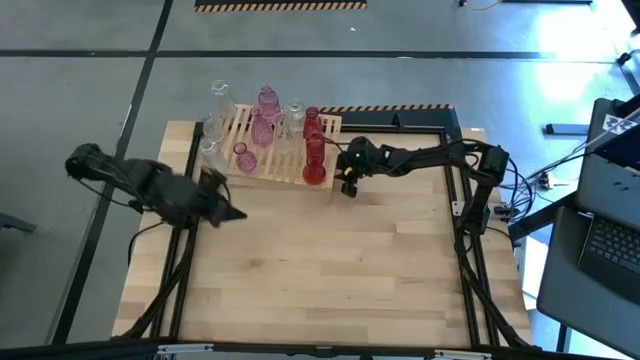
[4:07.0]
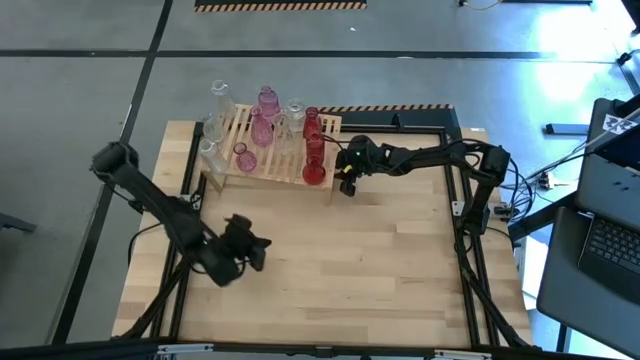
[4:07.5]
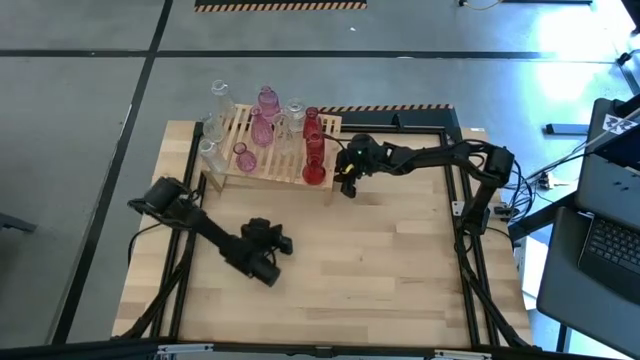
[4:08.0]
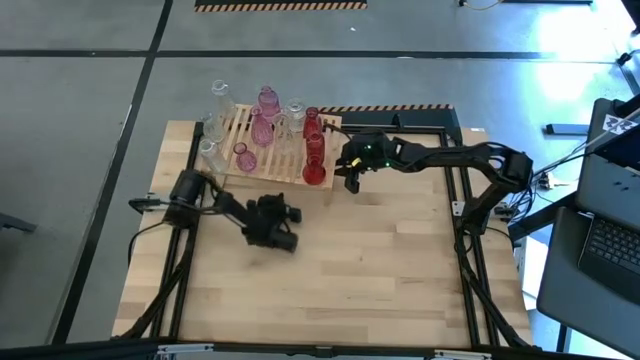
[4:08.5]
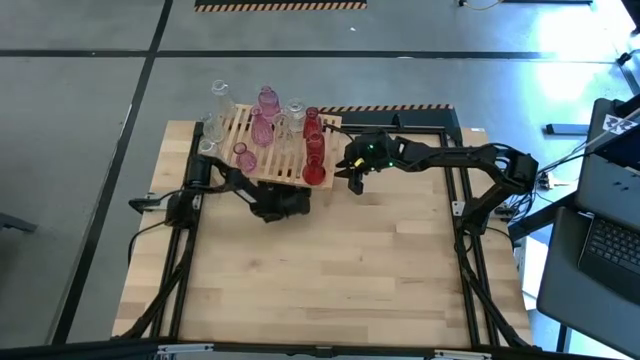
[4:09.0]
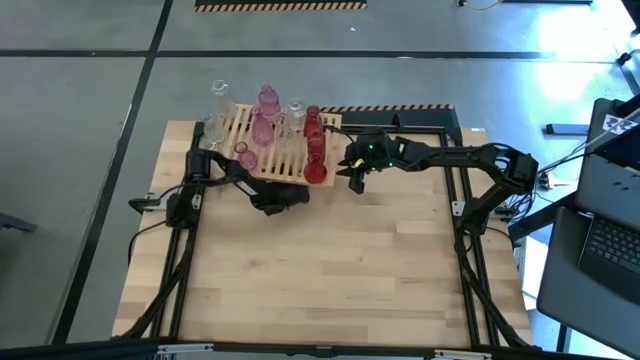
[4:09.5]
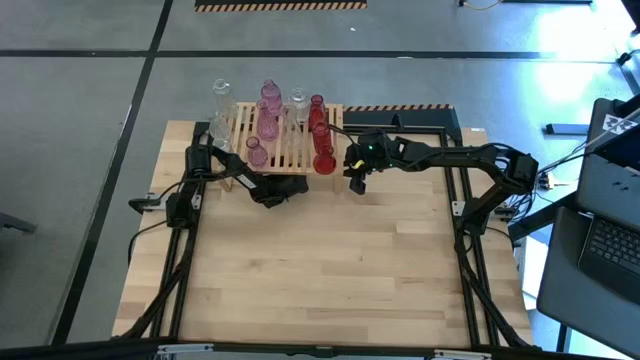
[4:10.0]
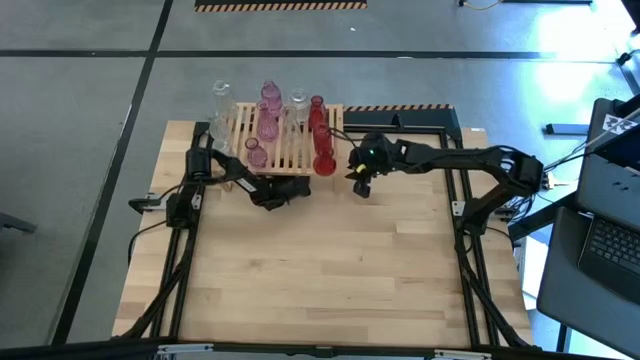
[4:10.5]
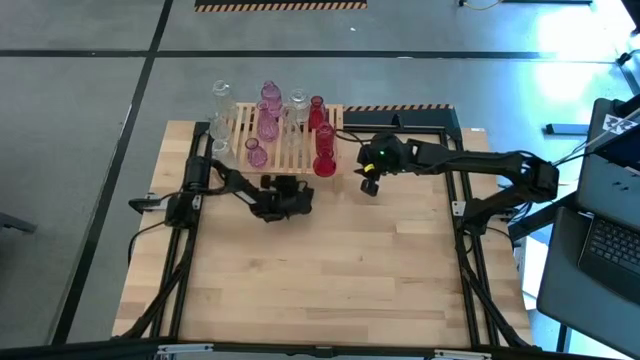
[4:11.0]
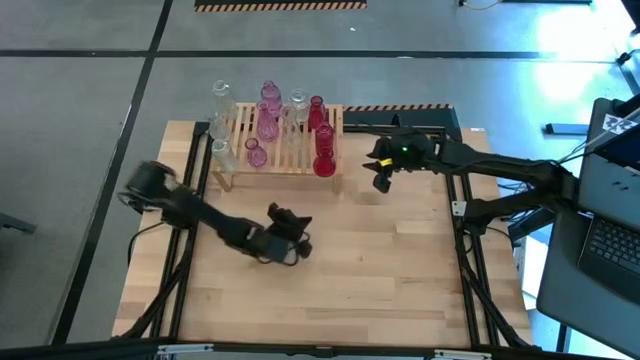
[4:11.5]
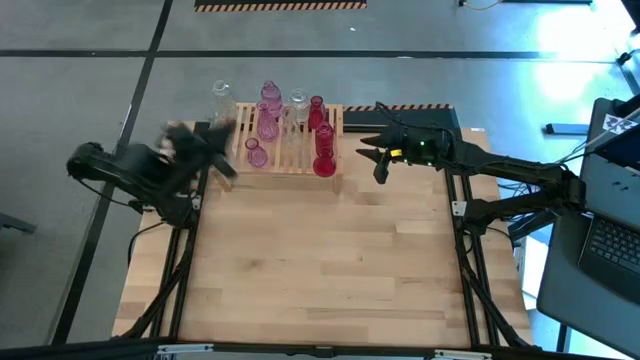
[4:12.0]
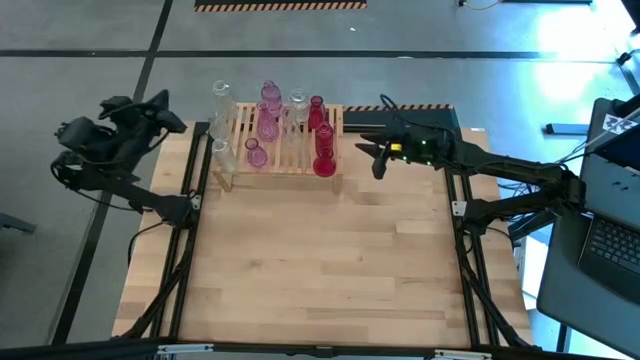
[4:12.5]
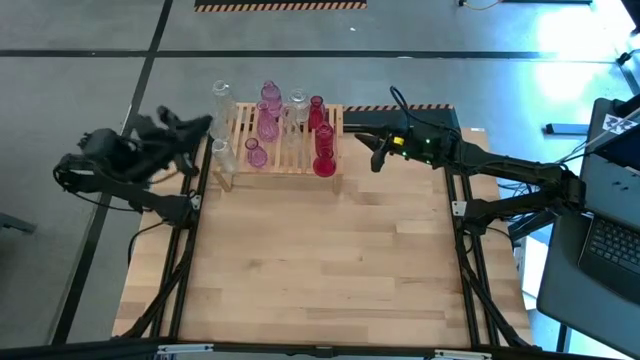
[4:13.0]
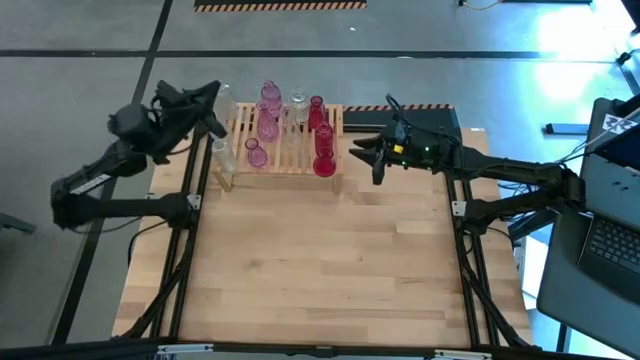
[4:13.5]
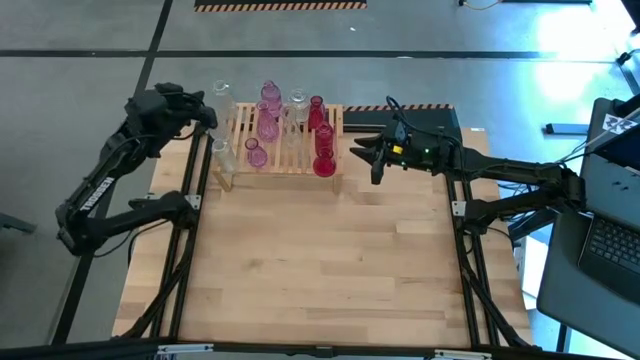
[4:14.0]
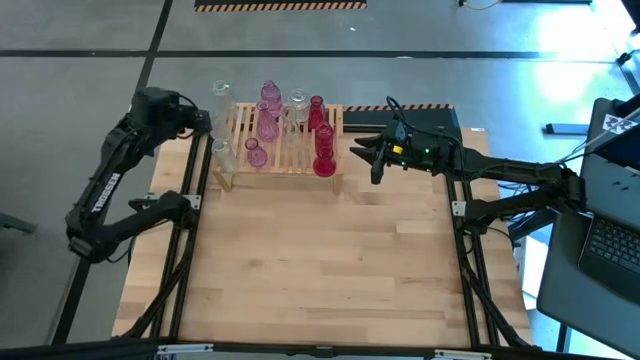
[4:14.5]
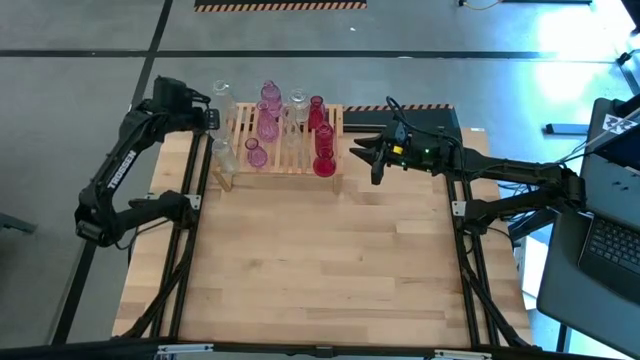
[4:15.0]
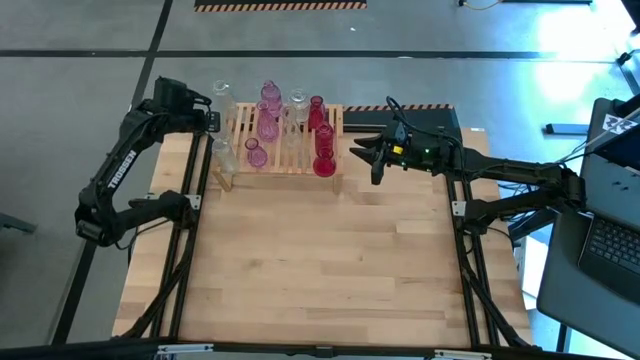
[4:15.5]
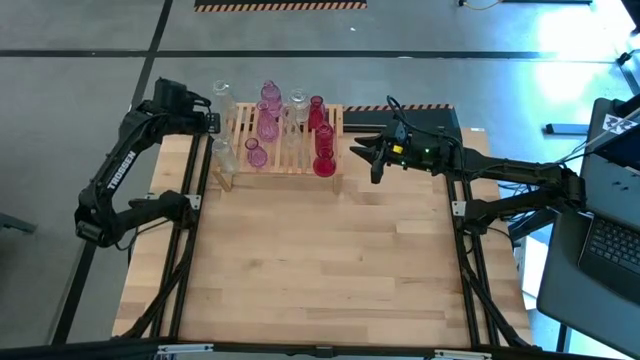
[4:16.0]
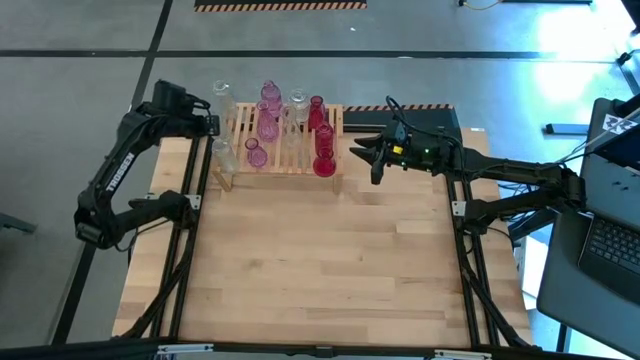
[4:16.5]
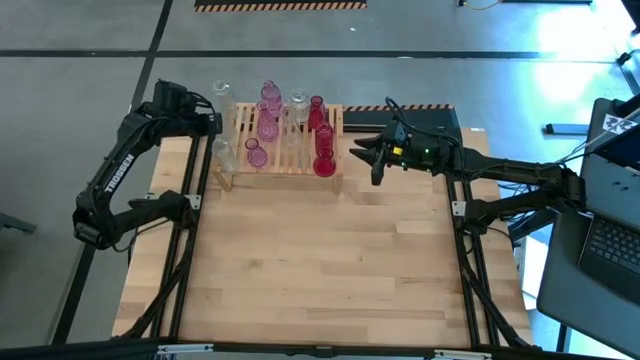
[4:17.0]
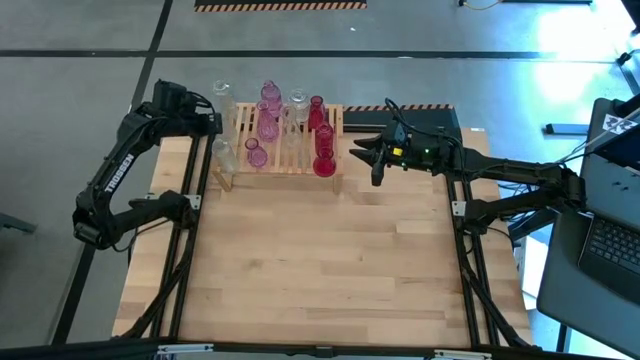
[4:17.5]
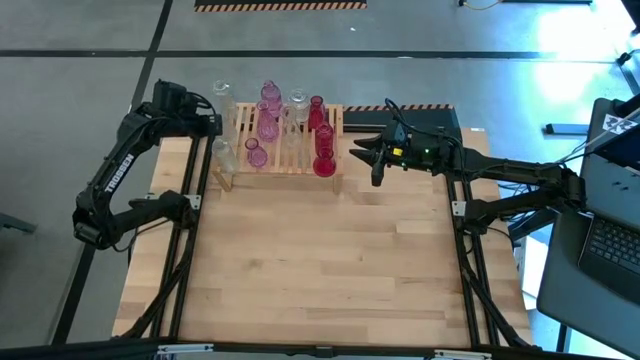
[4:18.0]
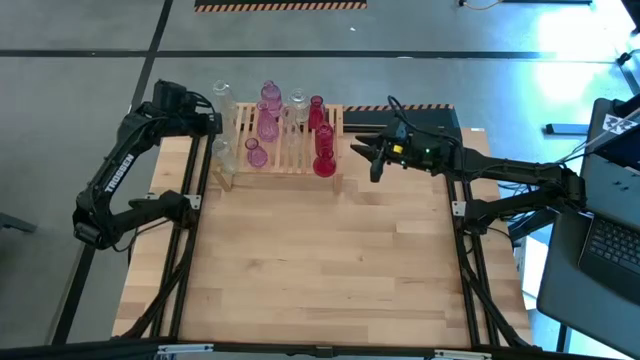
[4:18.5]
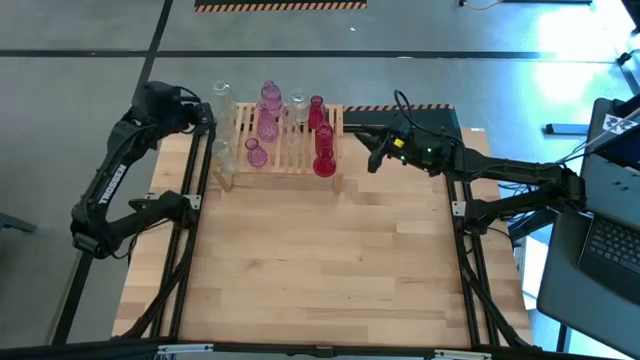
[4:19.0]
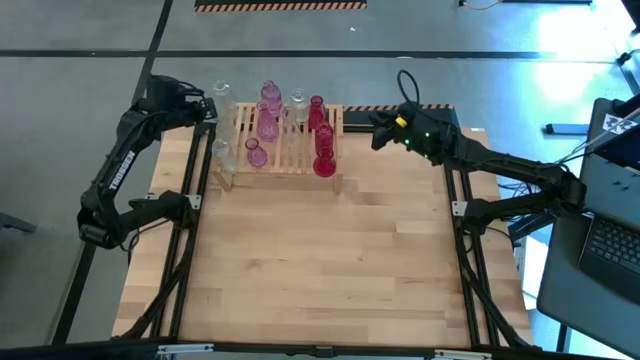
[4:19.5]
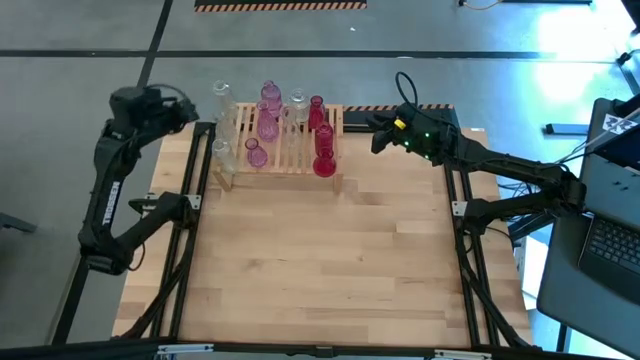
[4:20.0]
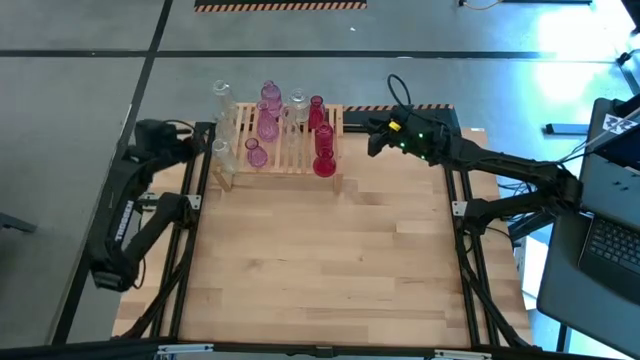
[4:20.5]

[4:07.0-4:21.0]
Task: sort vases onto shelf
Adjust the transparent vase on the shelf

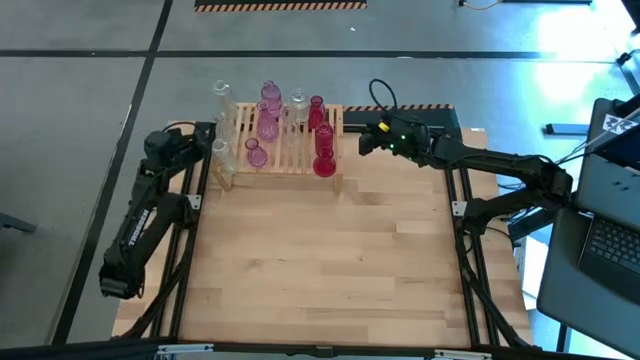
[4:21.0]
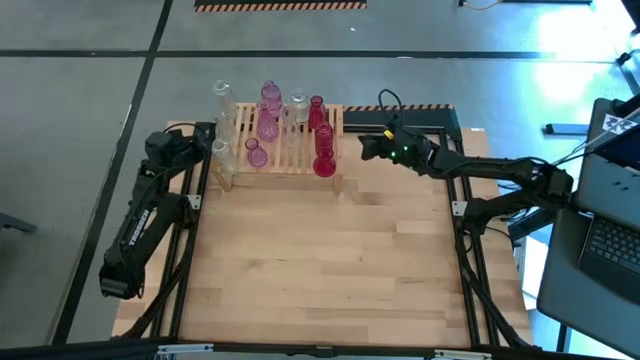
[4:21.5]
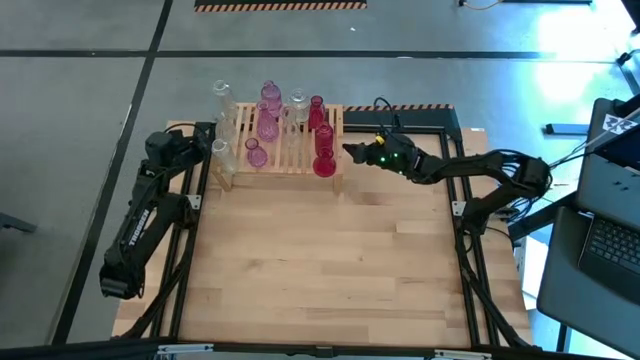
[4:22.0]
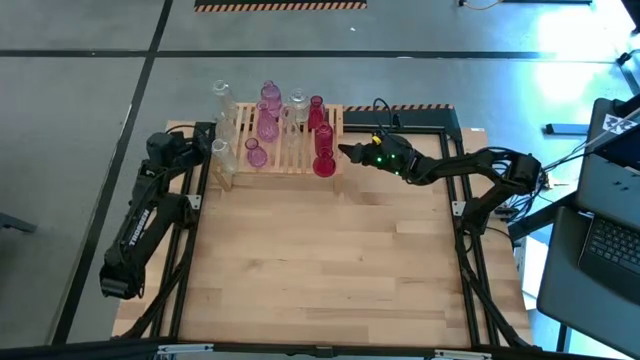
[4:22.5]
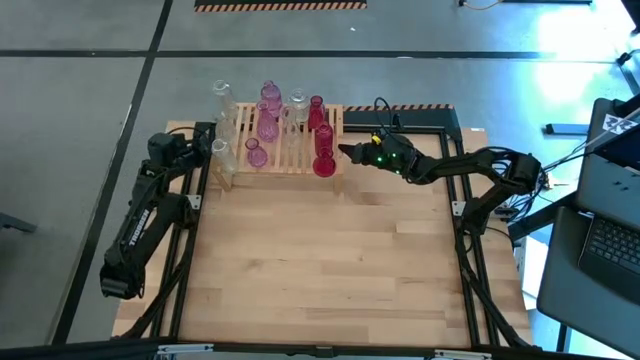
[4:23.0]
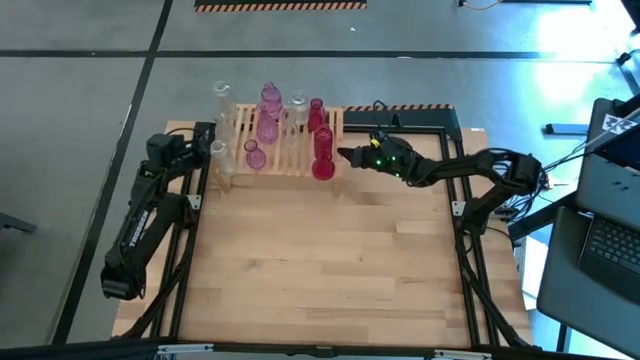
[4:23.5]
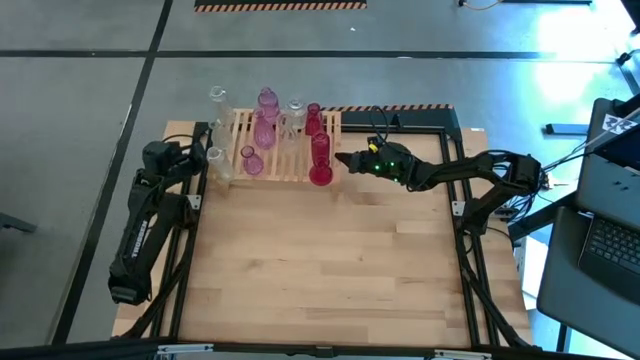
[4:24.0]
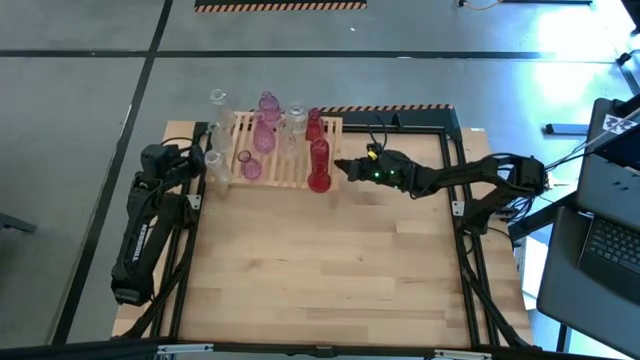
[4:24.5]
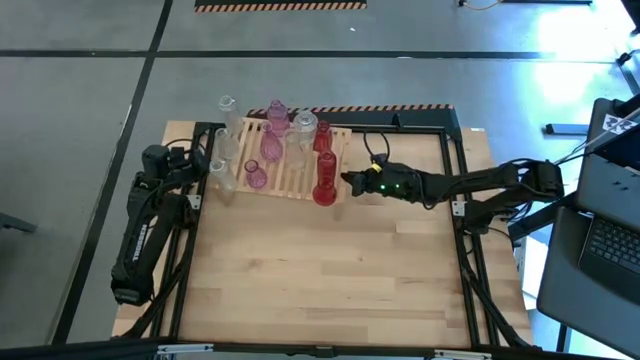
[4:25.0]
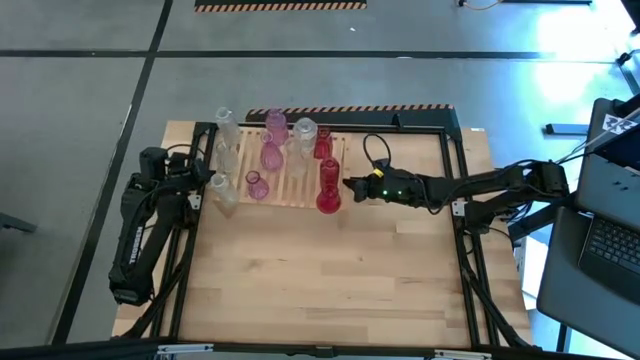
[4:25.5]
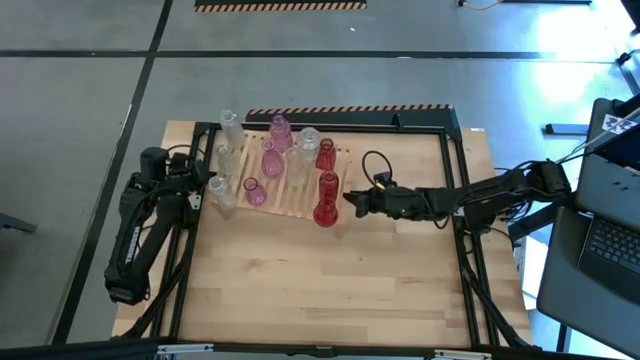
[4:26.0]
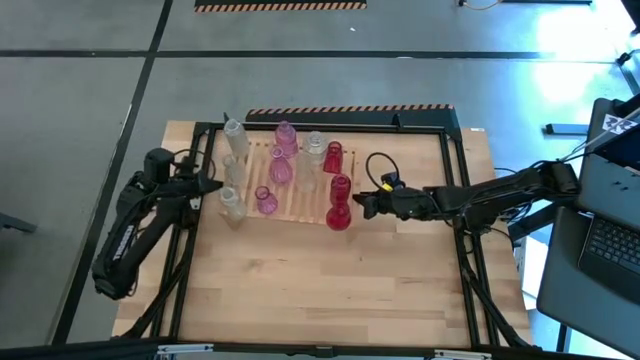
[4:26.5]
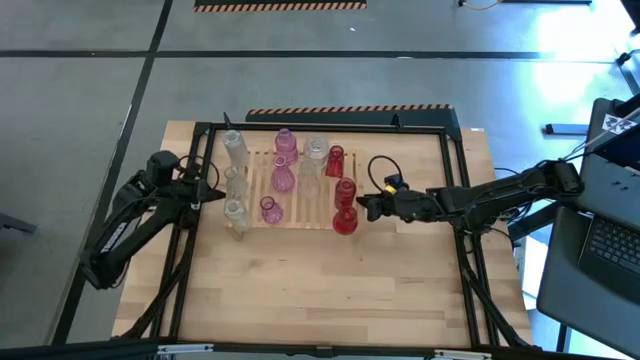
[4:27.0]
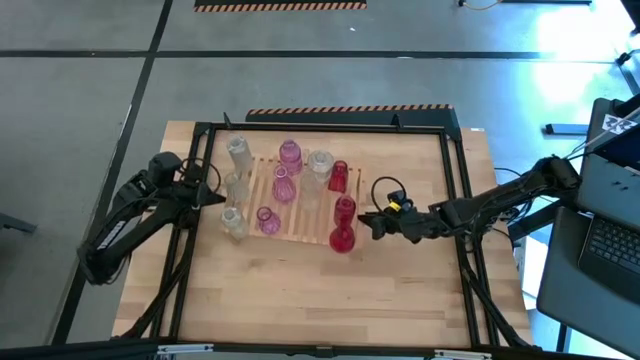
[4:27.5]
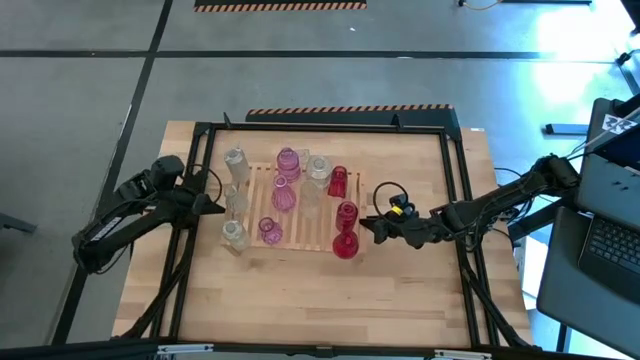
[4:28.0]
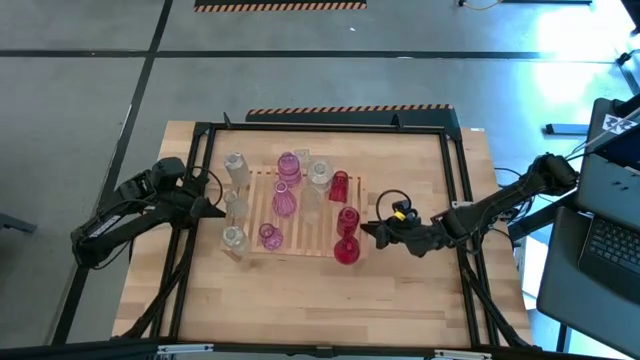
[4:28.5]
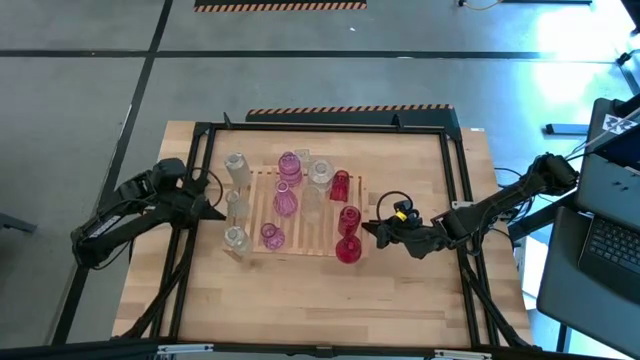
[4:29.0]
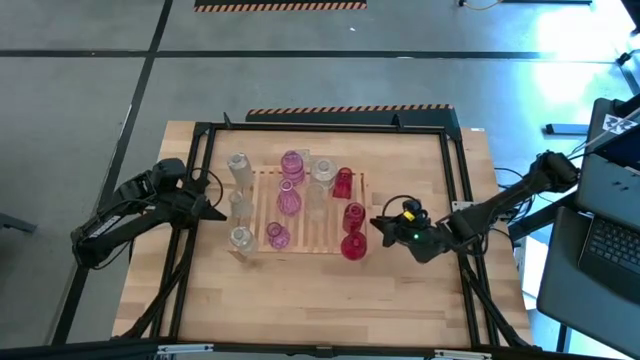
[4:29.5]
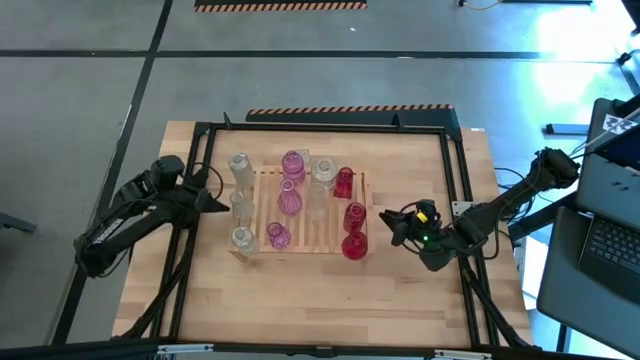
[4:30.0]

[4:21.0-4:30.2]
Move the shelf to the center of the table
